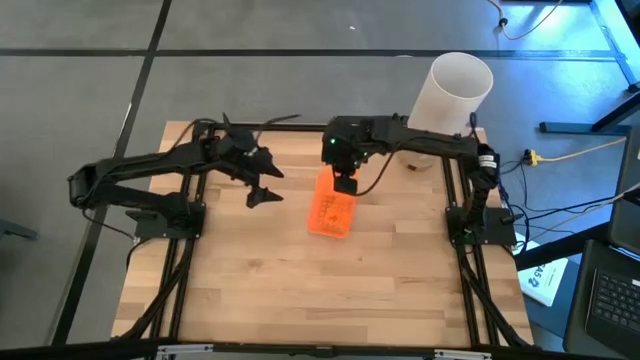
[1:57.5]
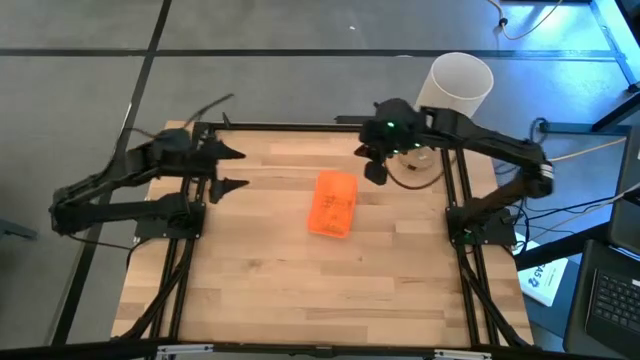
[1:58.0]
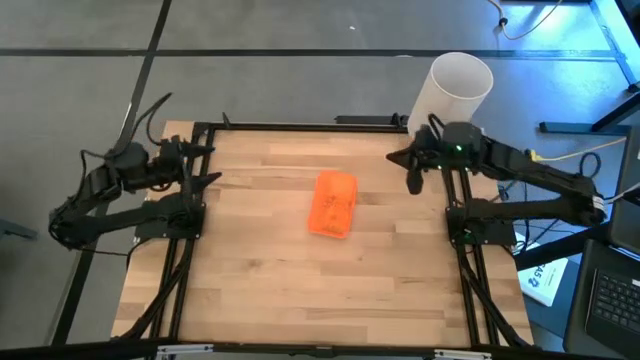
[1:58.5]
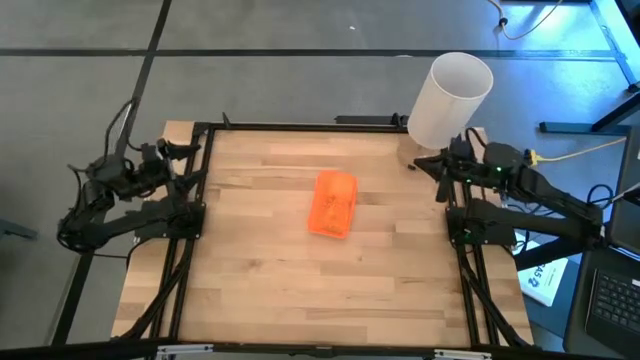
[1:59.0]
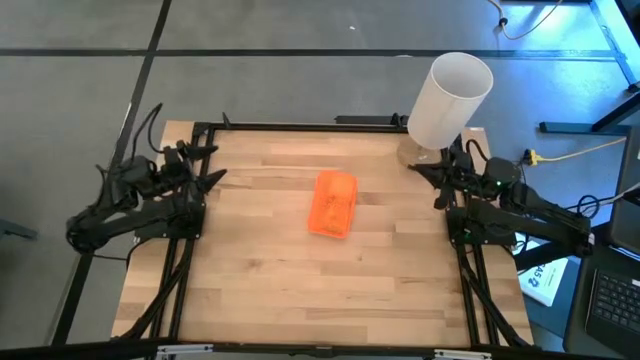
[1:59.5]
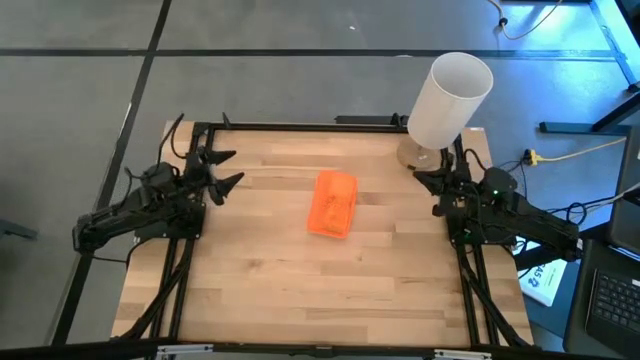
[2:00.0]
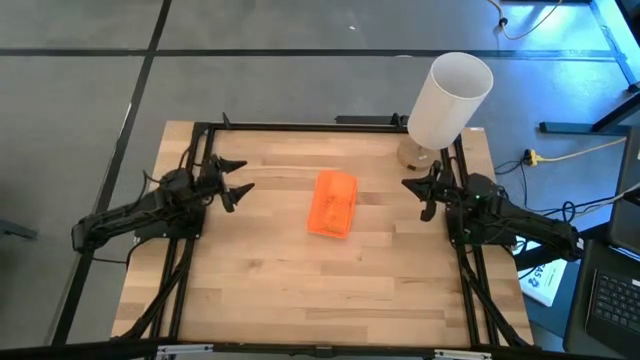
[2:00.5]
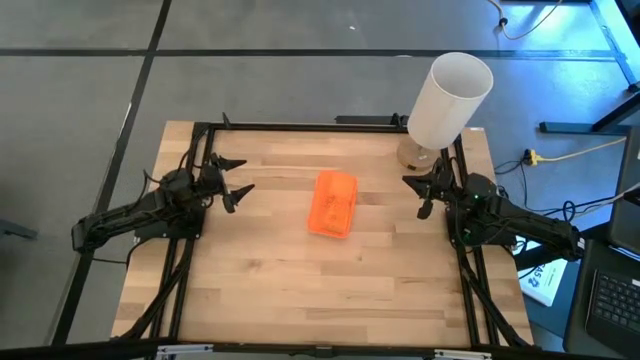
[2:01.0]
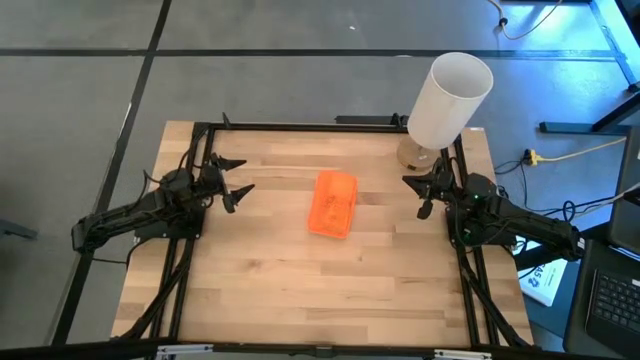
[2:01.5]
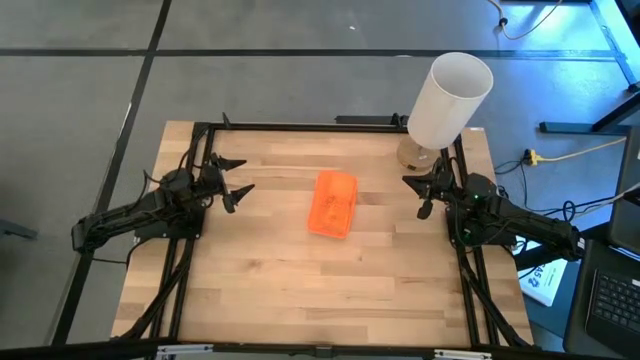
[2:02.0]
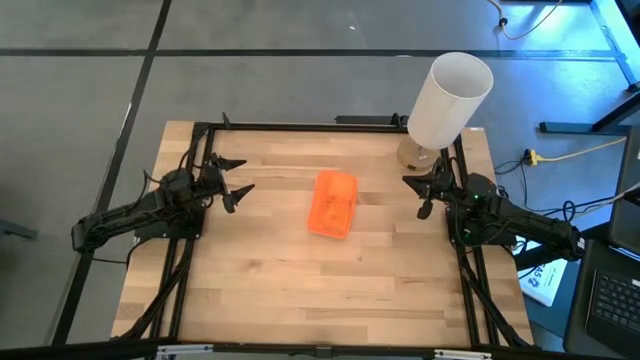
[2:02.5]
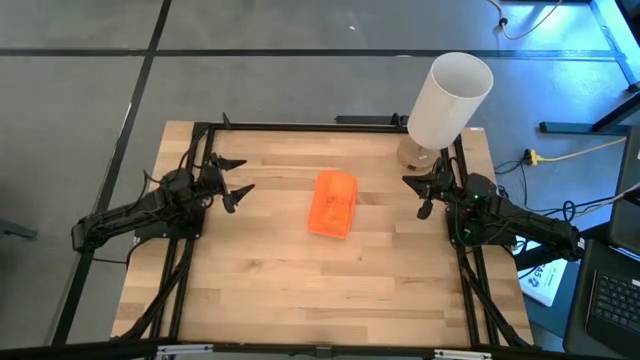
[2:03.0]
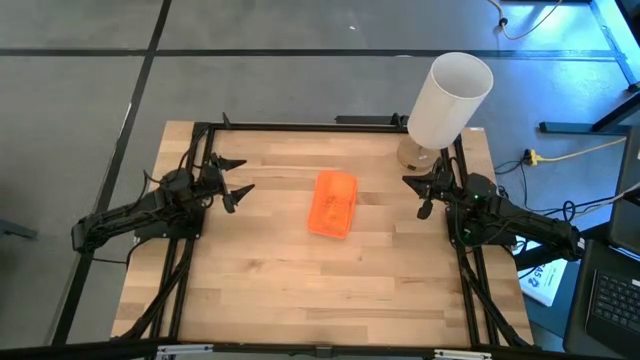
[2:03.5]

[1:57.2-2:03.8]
Task: Pack school essentials
Return to Home Position

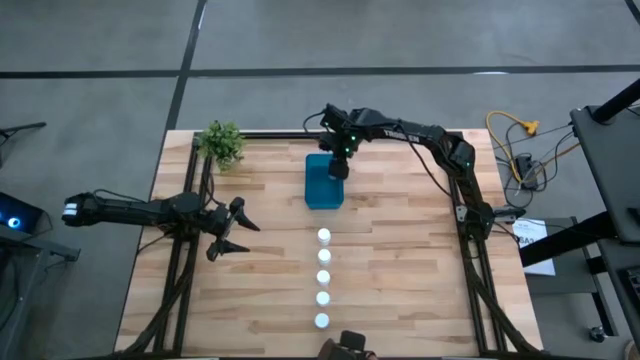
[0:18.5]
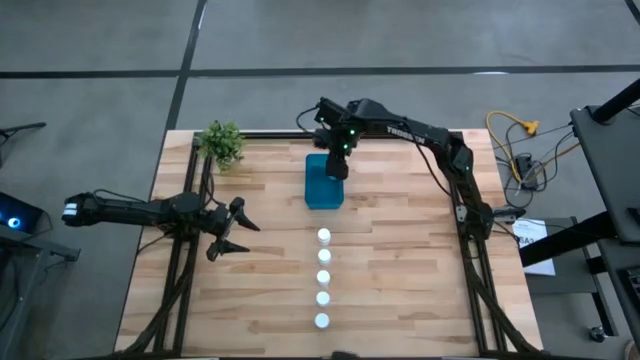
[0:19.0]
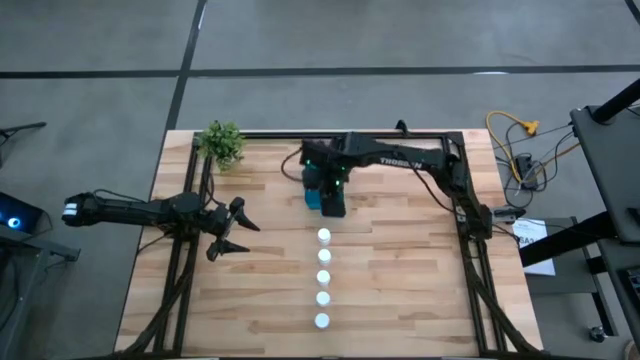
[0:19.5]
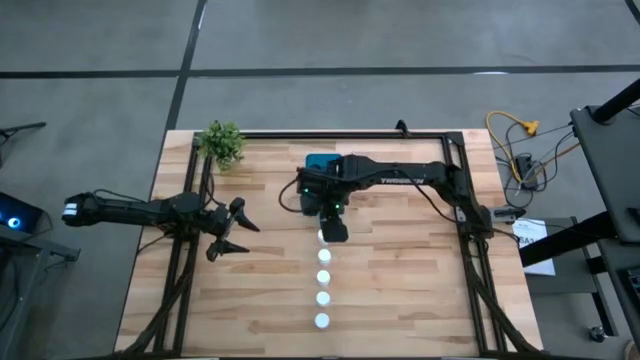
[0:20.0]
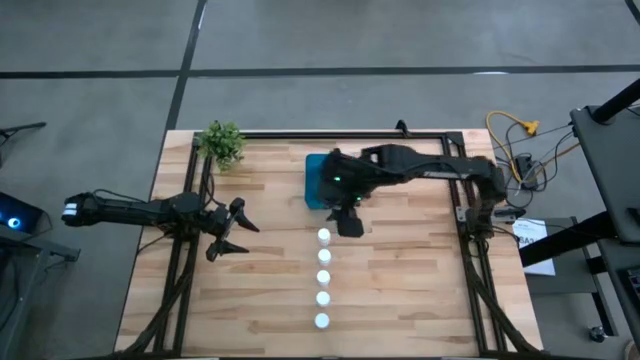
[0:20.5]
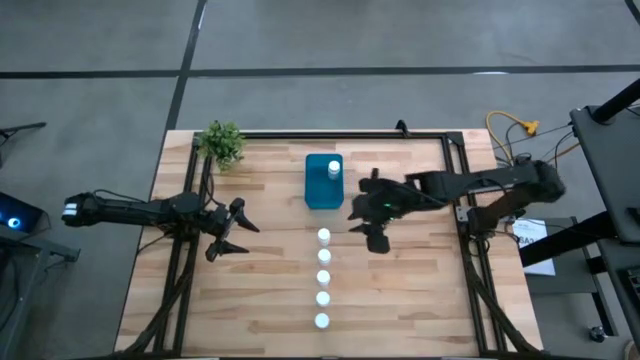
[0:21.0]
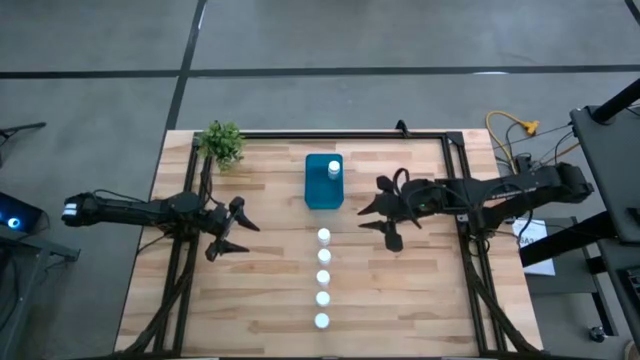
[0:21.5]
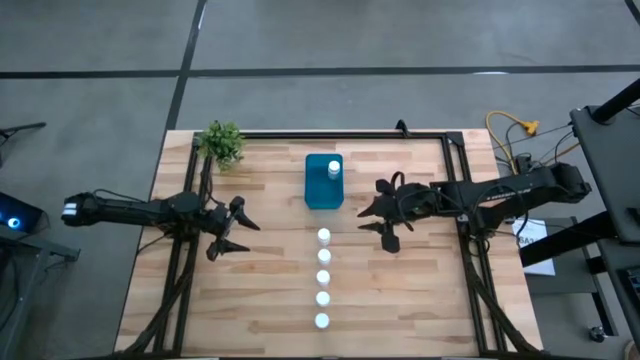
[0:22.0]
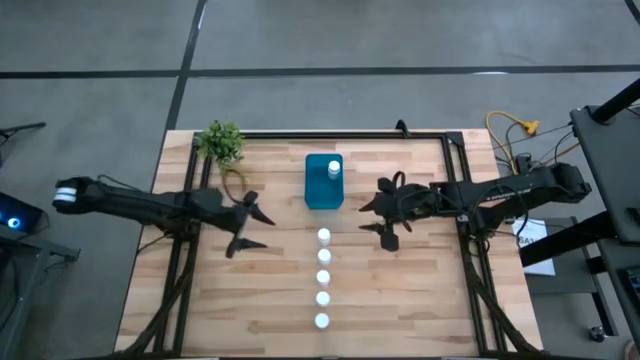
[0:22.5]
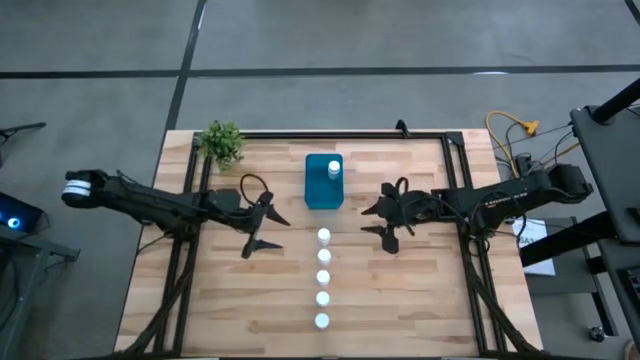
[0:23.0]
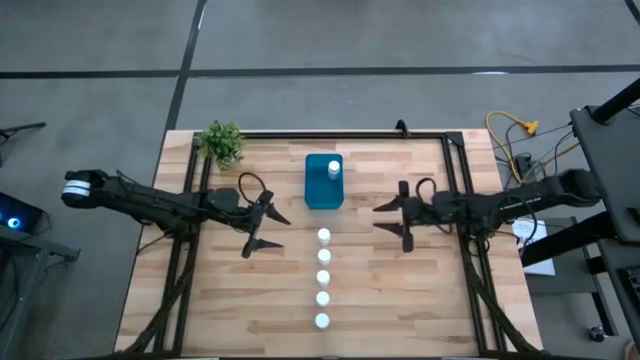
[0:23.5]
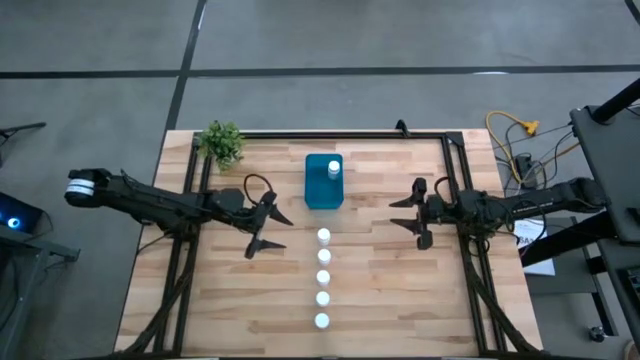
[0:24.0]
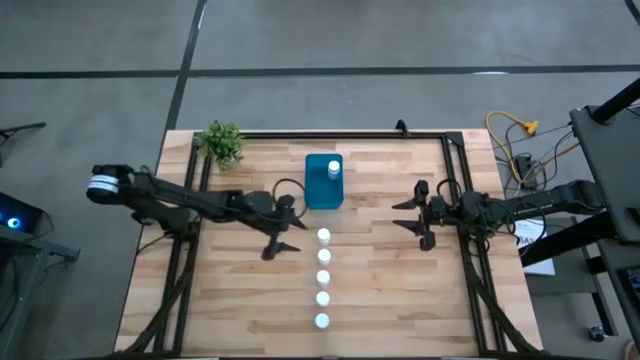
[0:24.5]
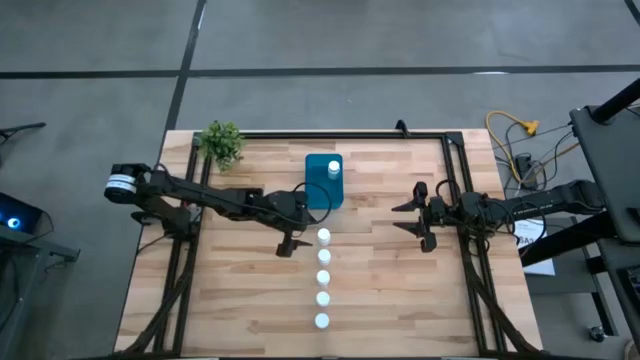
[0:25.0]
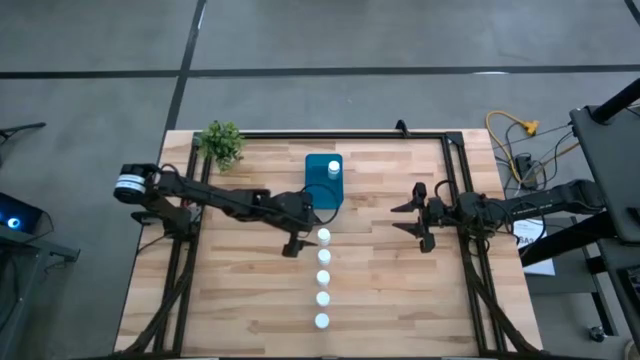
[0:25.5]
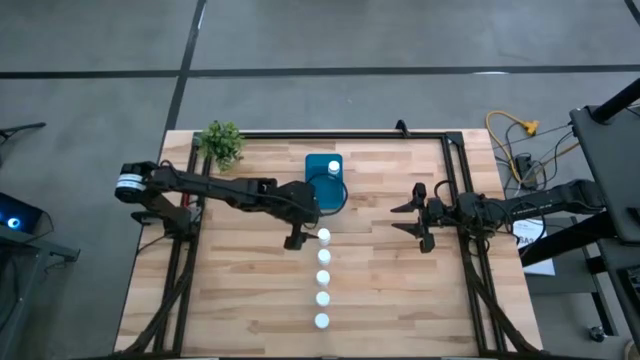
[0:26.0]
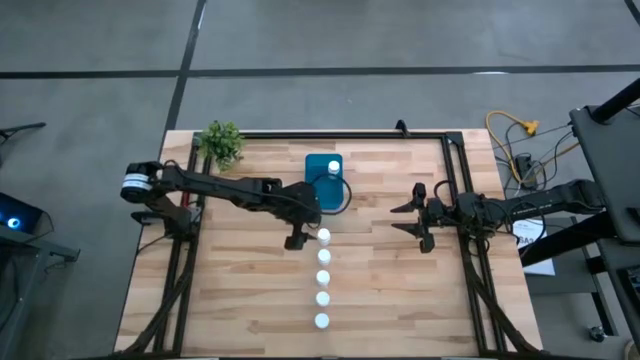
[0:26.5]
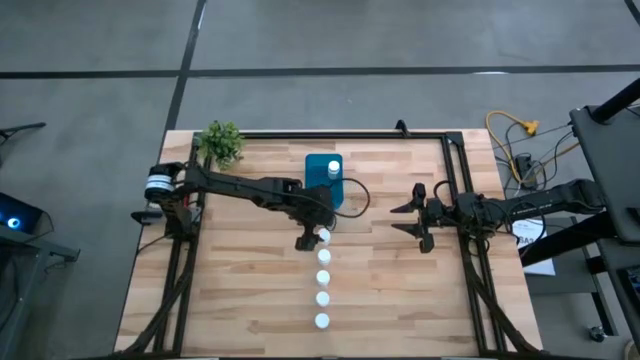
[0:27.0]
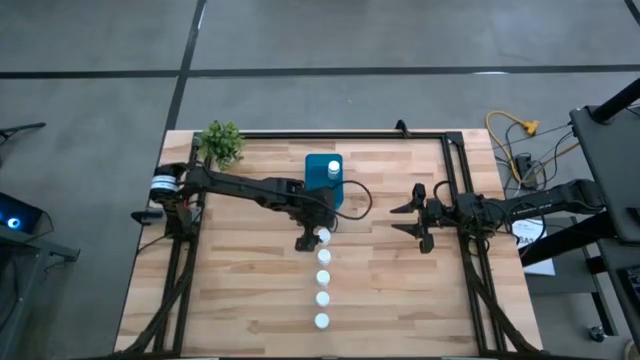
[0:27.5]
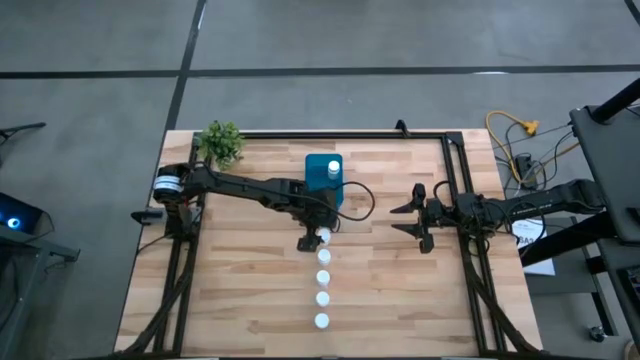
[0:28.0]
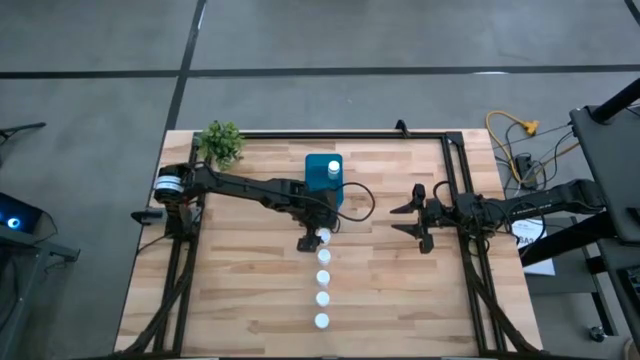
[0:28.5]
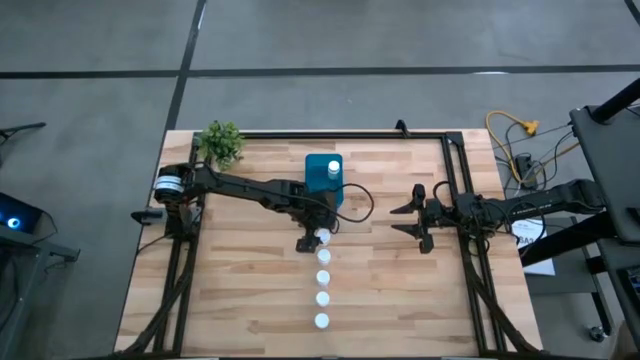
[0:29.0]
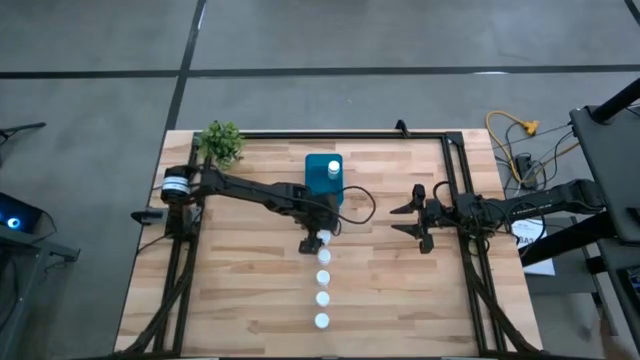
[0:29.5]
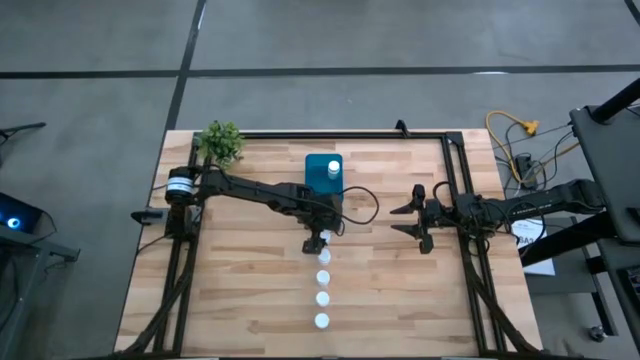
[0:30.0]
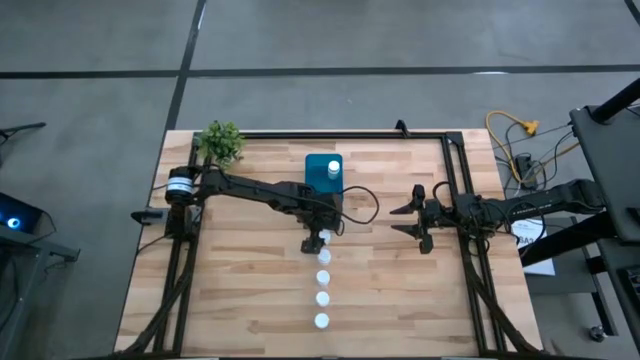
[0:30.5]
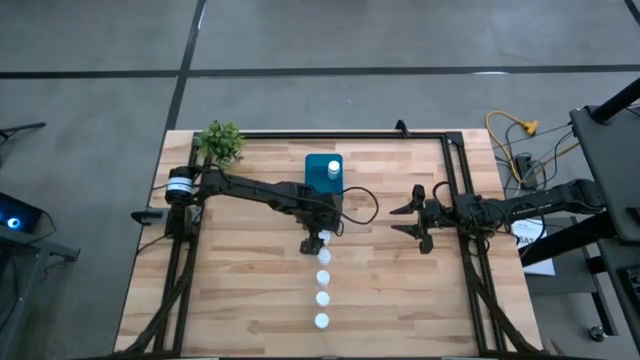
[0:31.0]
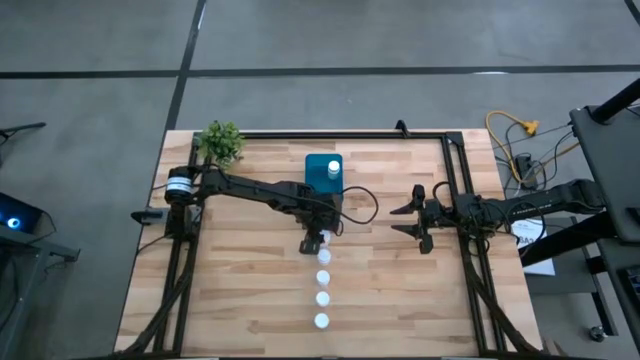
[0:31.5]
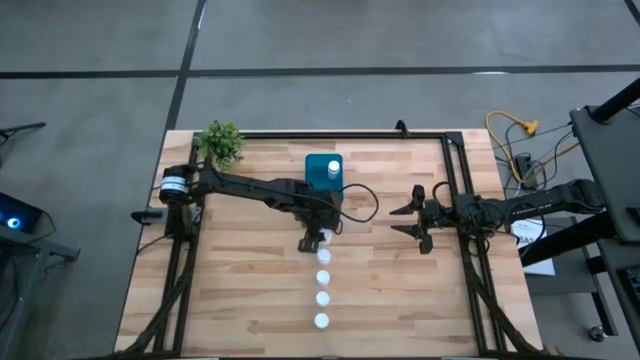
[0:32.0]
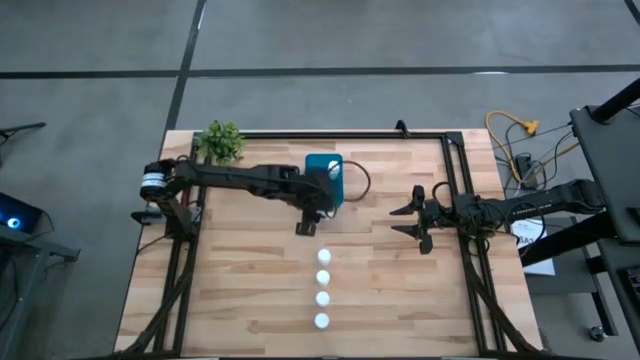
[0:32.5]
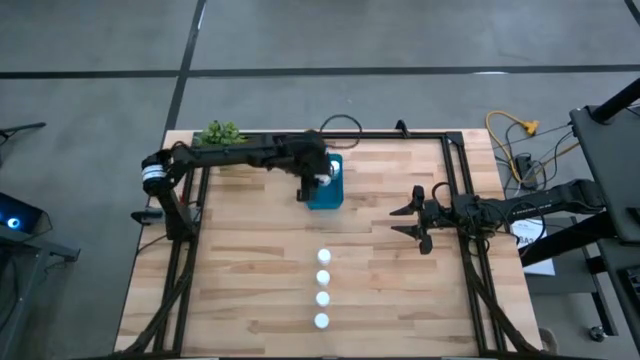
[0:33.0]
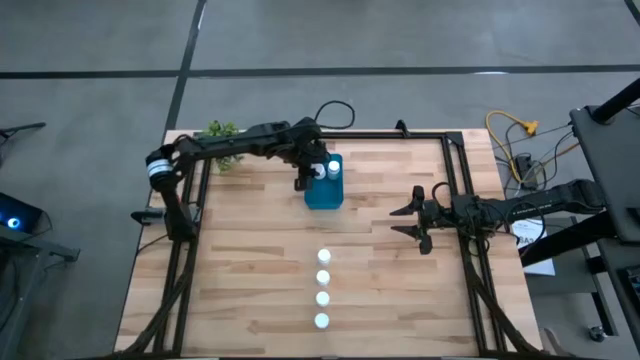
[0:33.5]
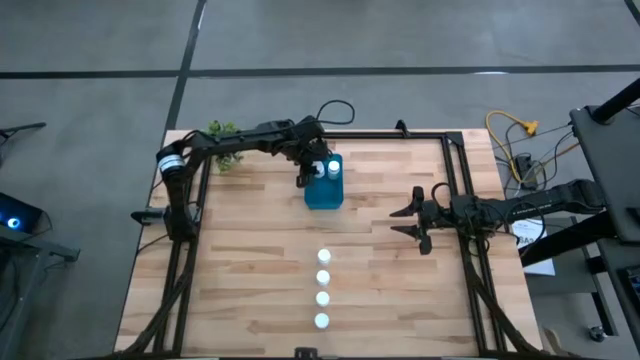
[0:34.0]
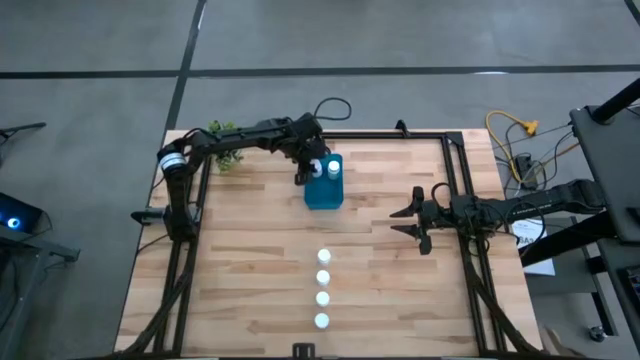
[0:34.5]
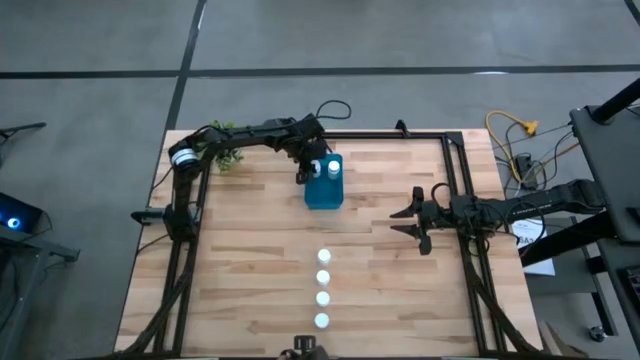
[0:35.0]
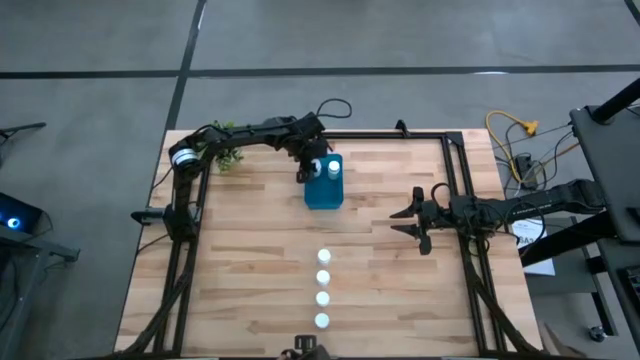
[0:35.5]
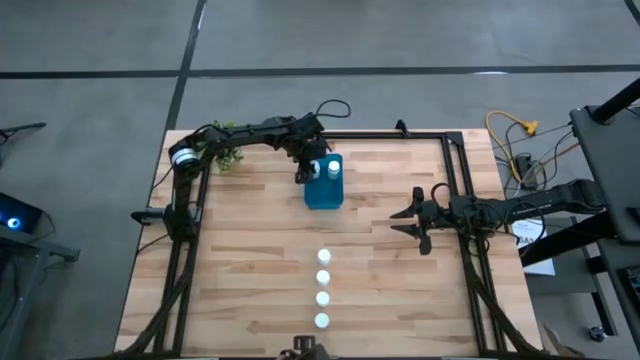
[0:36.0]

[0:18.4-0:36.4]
Task: Pick and place pill bottles into a basket
Put the white pill bottle into the blue bin
